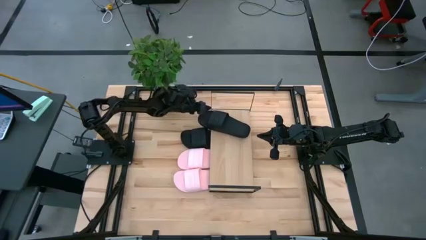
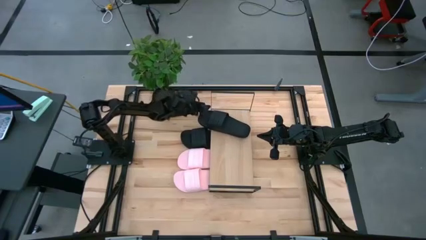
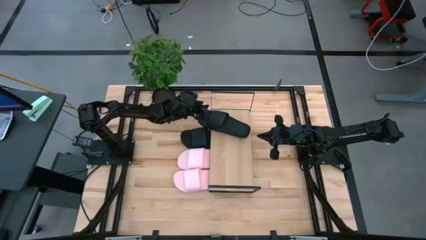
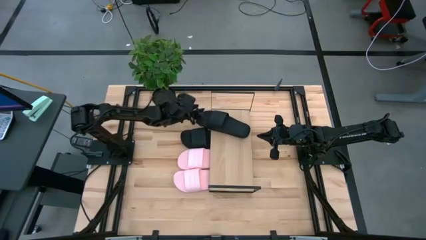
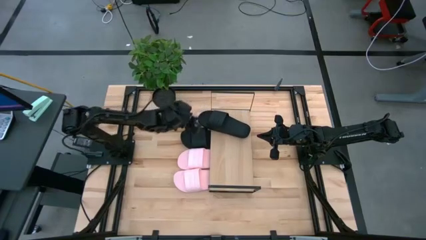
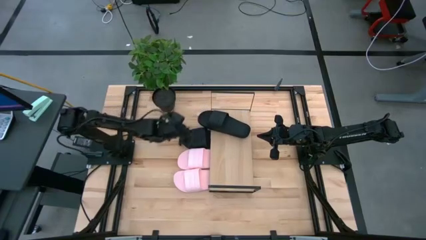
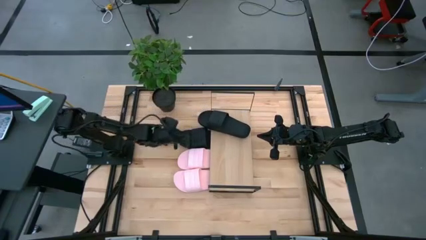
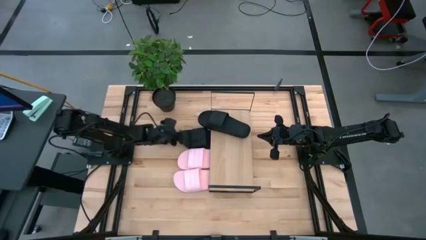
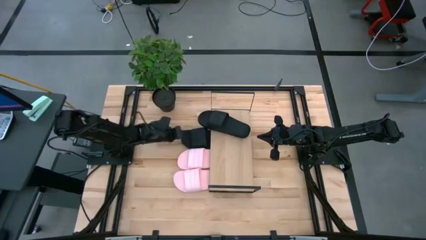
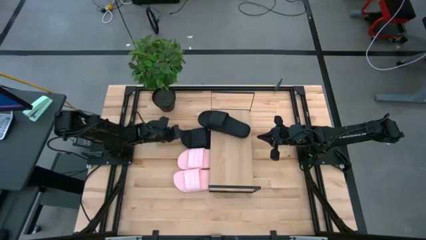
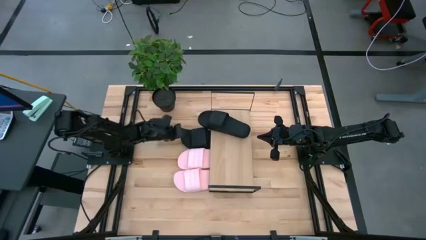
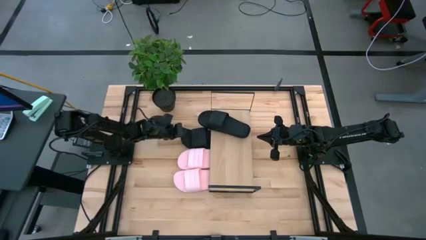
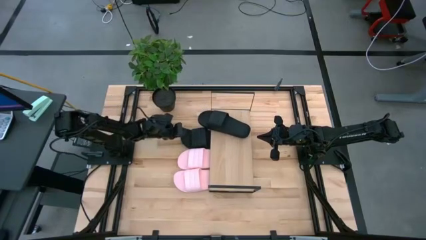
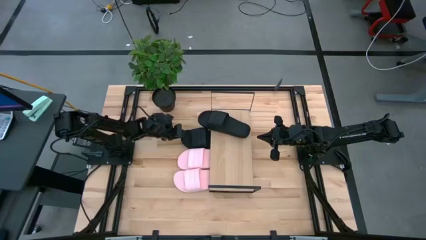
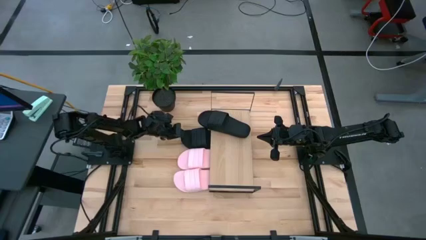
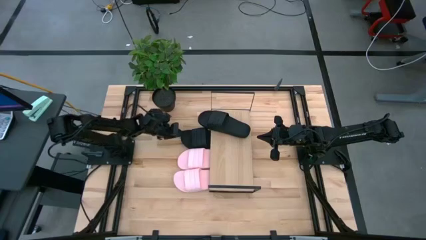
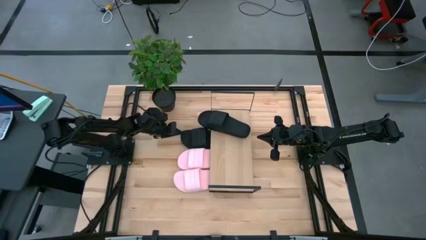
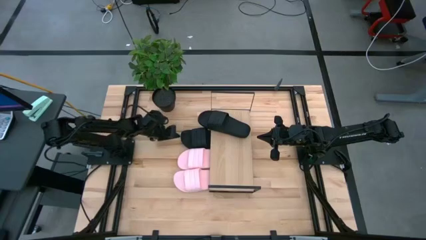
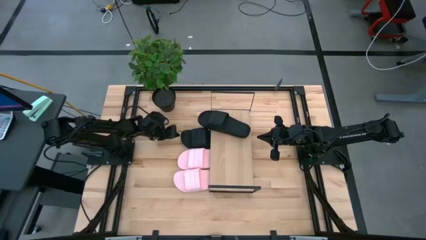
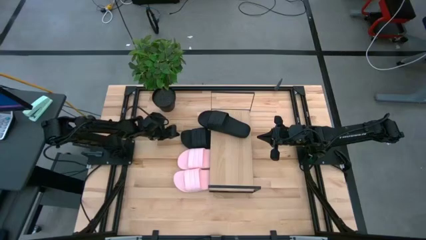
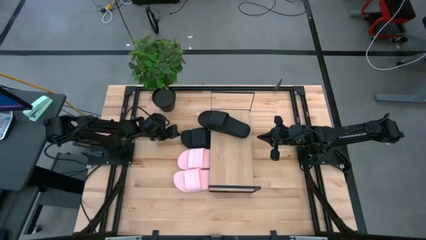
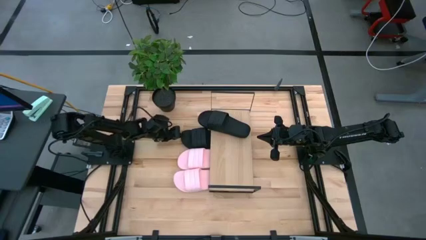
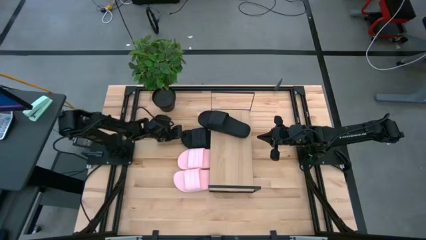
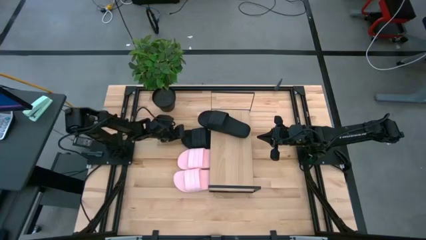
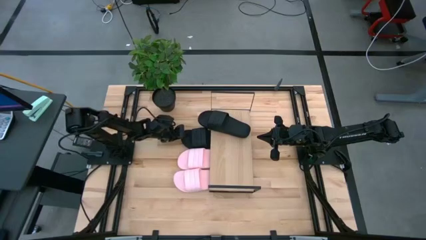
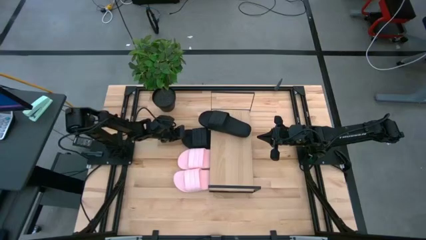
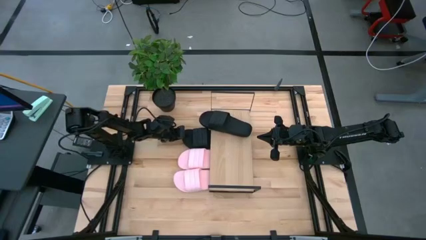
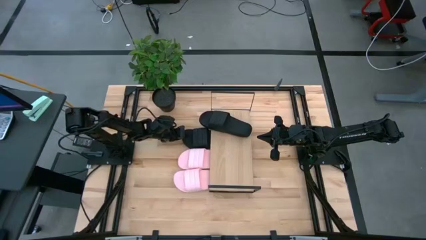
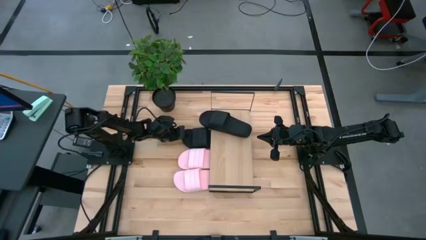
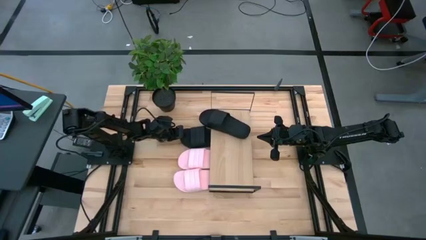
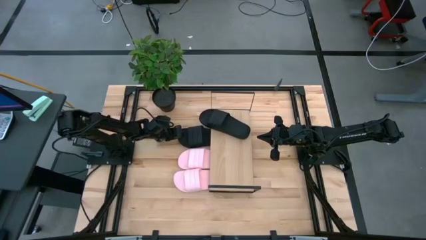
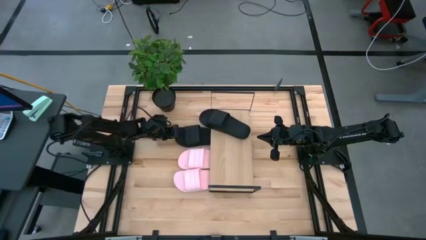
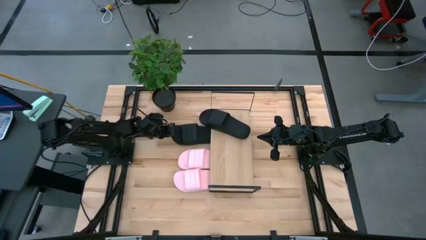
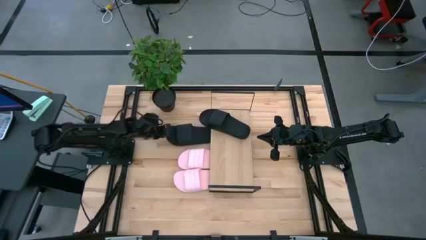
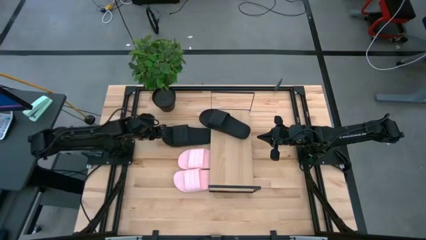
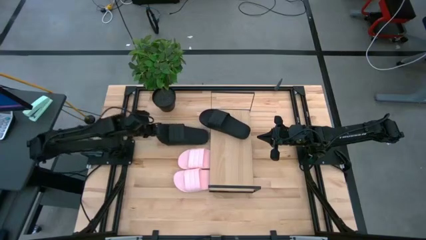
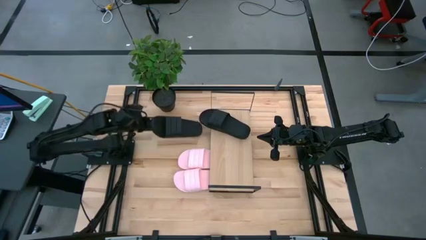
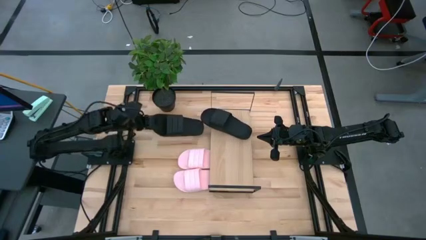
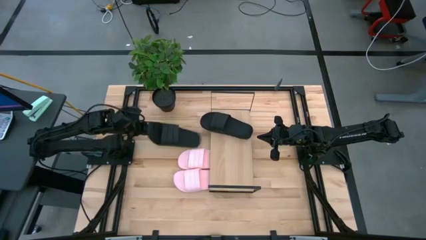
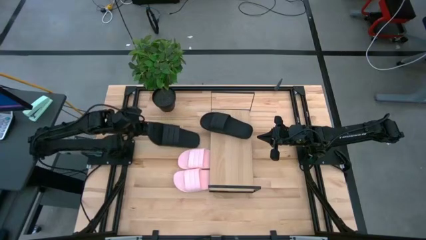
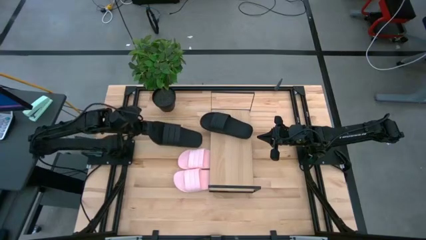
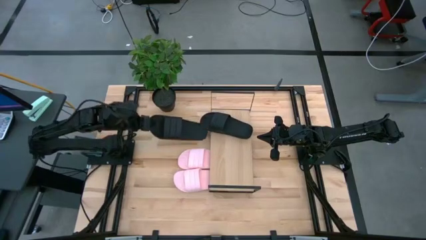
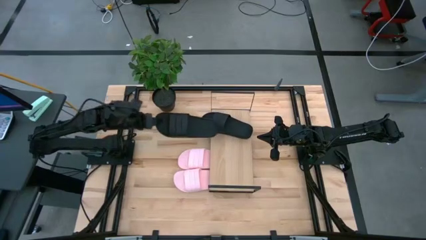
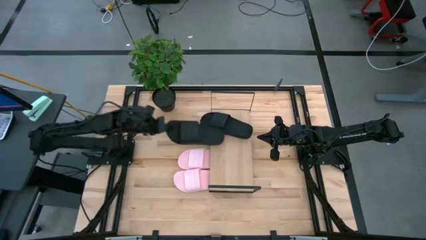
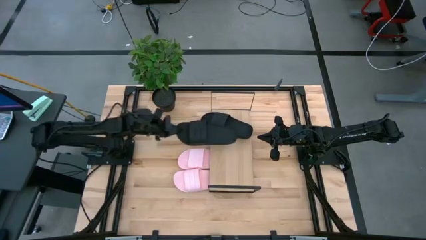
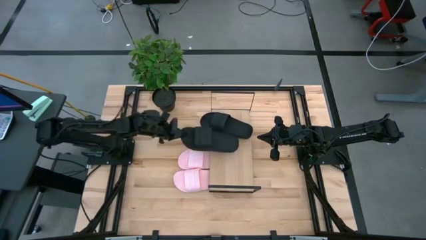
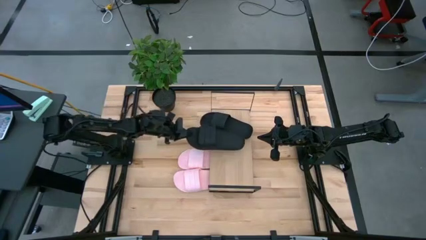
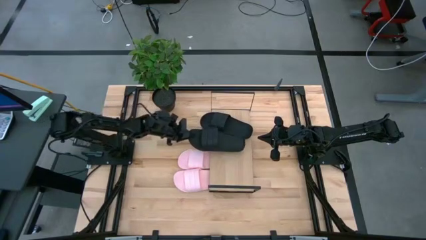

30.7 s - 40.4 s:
Task: Pick and place slides into the shelf
Put the black slides on the shelf

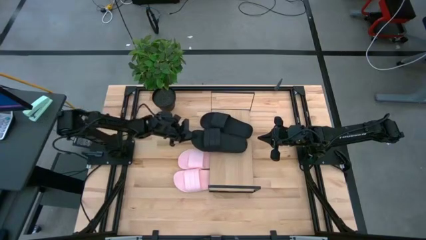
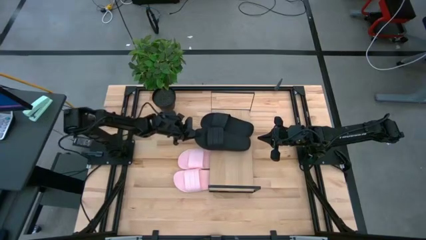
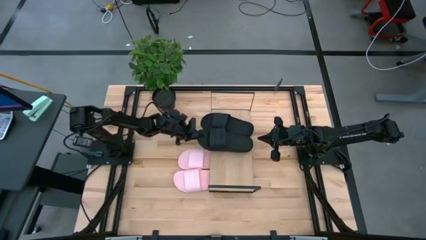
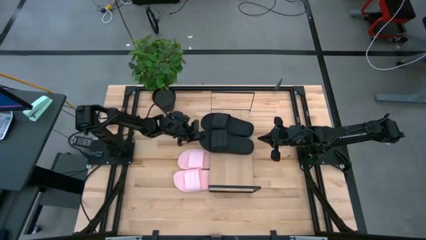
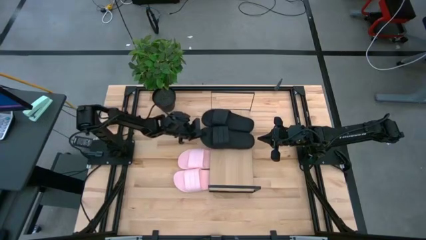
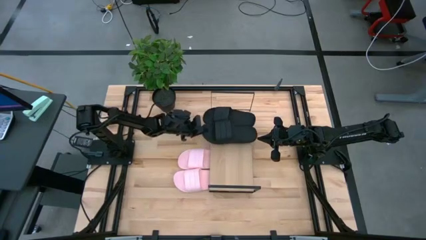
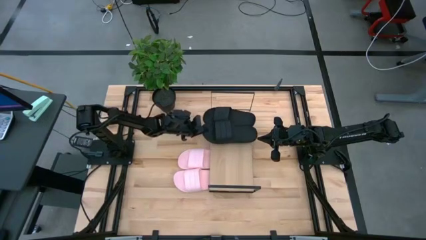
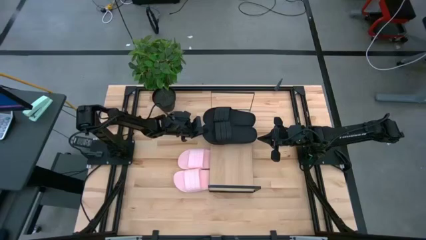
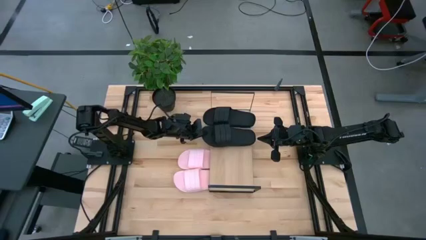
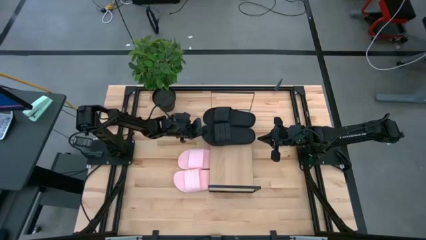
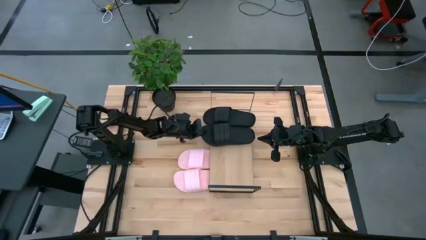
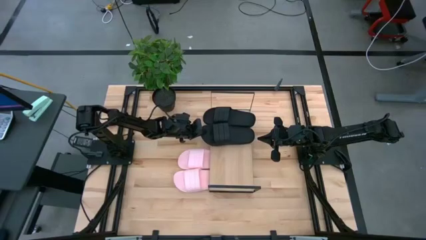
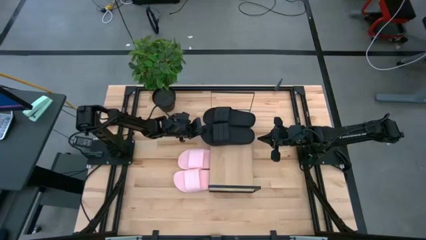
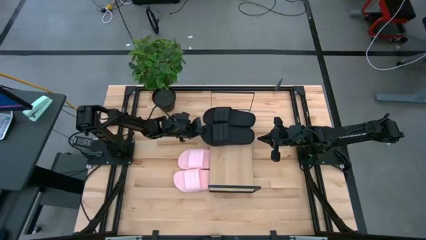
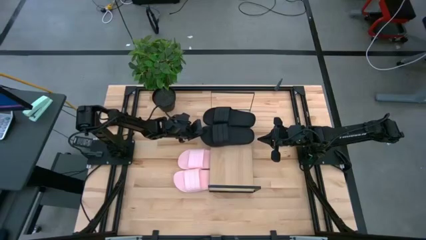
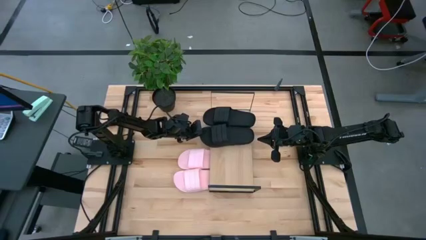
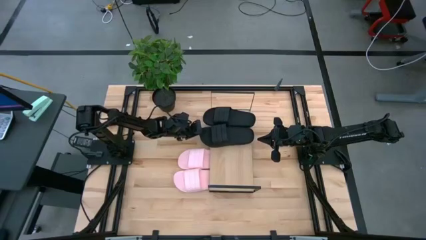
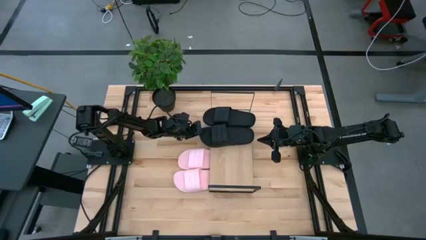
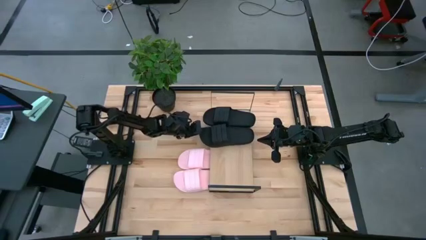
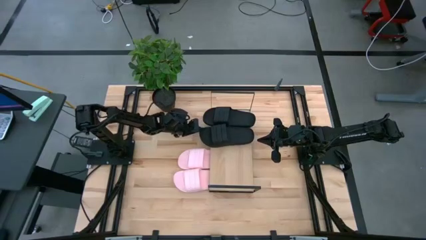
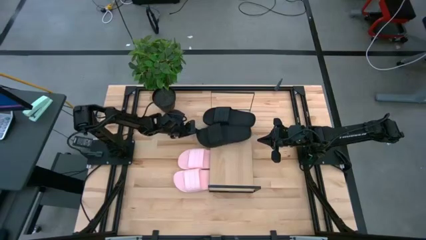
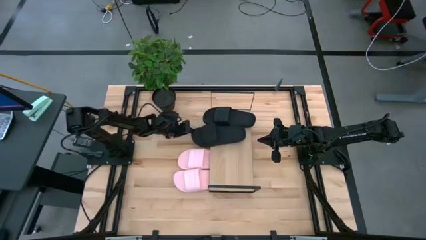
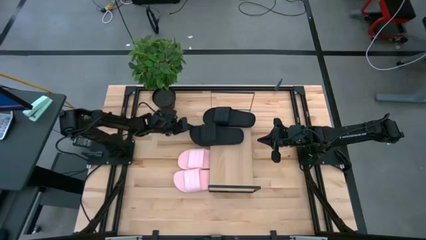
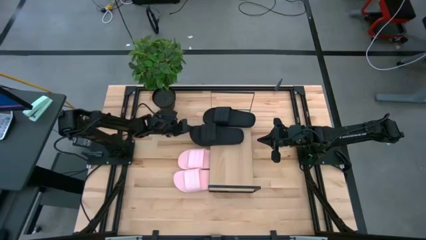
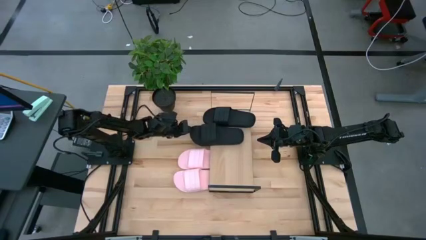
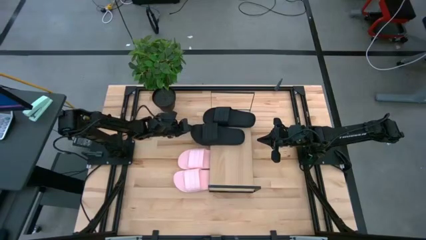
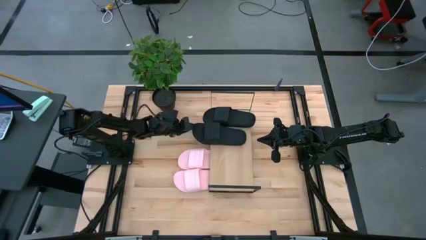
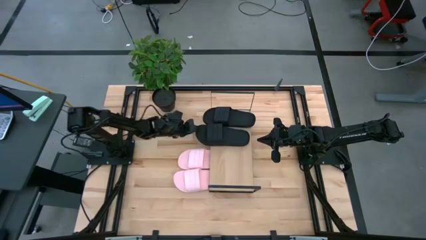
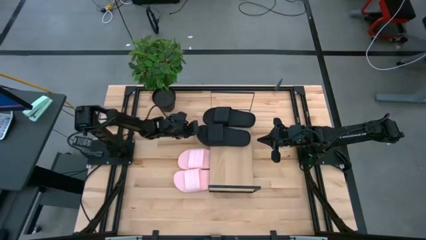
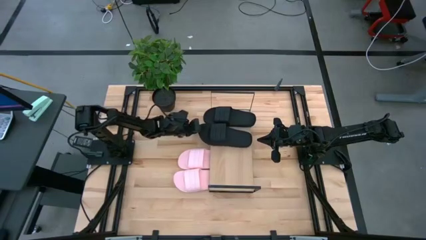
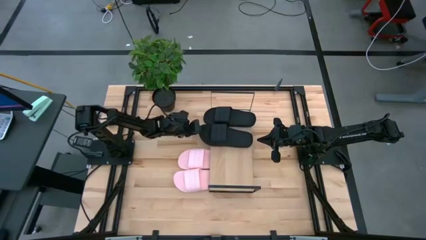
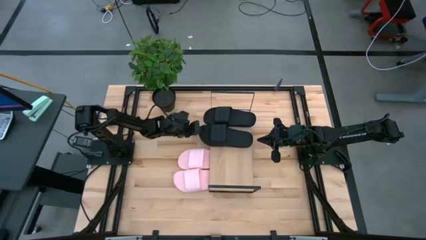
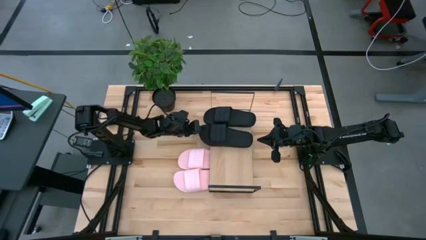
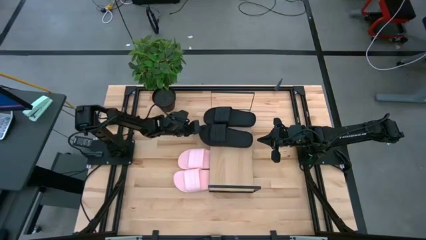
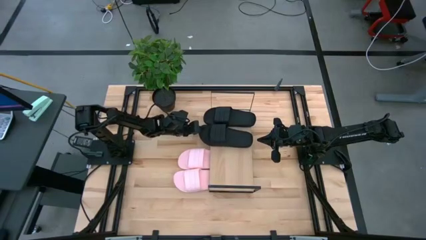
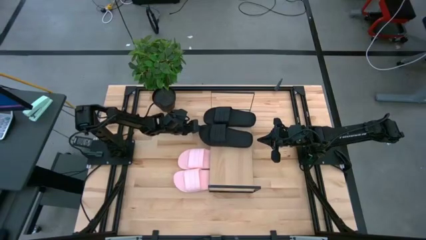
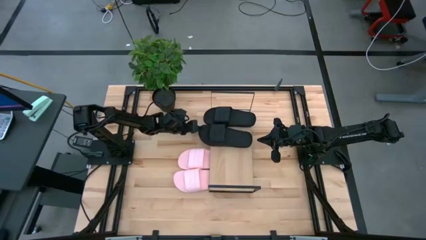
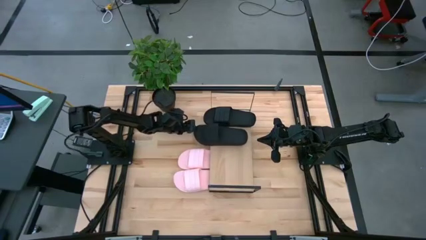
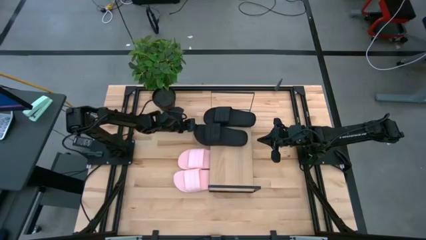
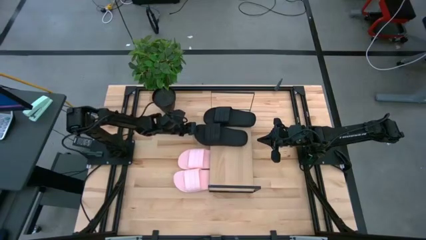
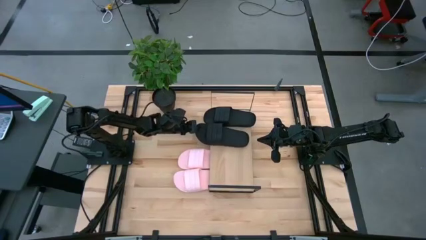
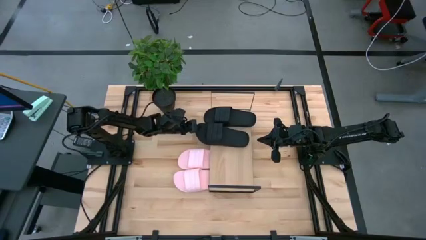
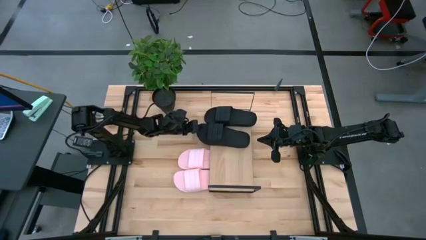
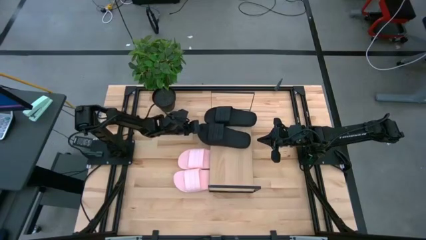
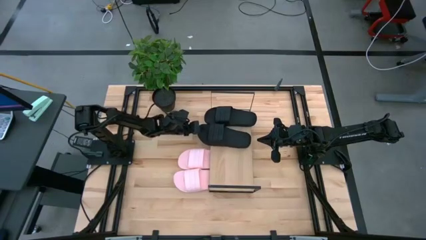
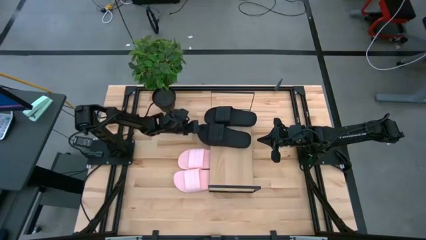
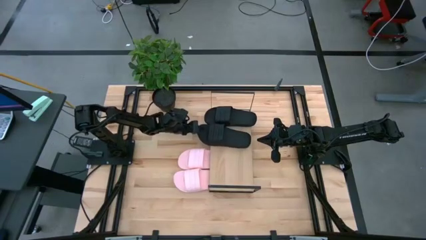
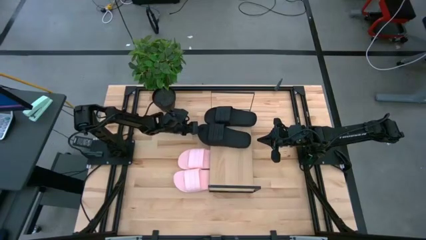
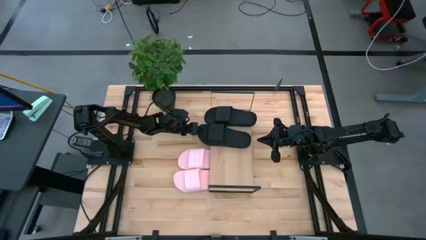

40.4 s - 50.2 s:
Put the black slides on the shelf
